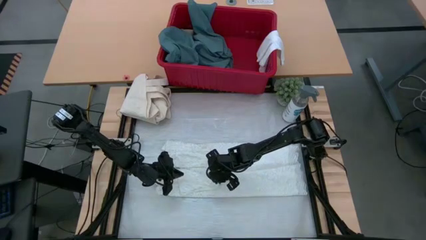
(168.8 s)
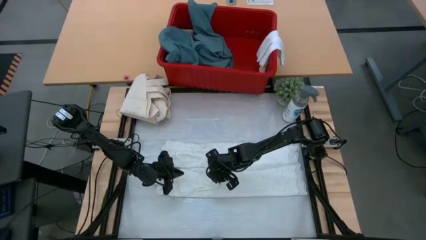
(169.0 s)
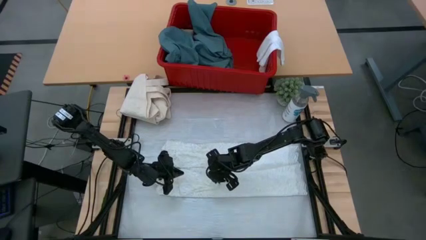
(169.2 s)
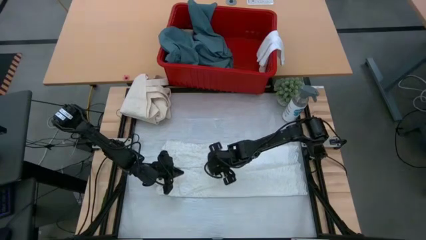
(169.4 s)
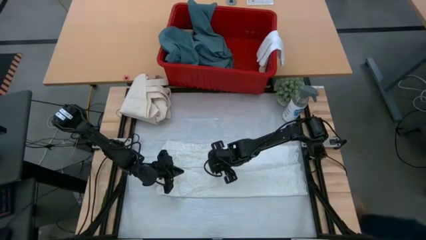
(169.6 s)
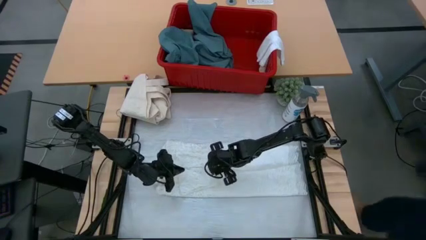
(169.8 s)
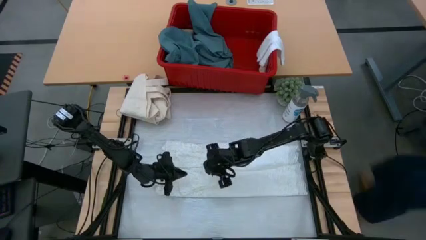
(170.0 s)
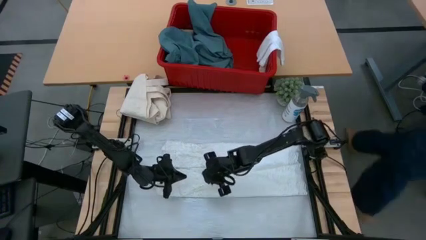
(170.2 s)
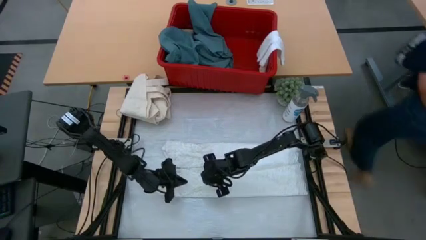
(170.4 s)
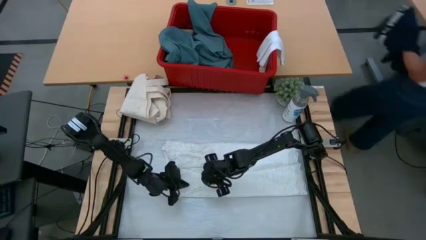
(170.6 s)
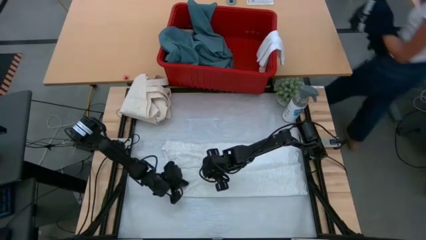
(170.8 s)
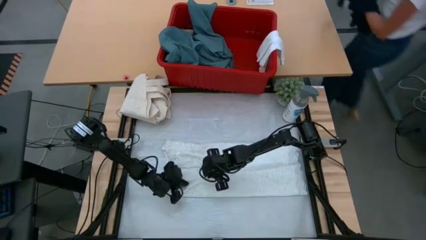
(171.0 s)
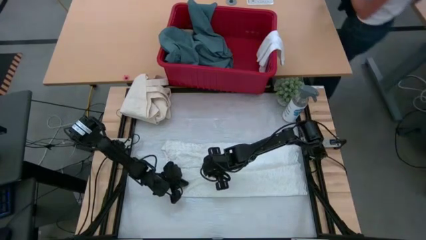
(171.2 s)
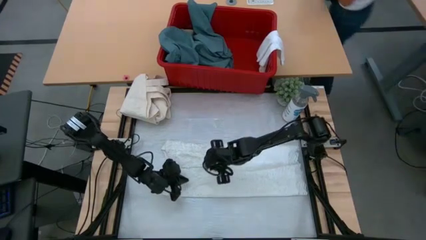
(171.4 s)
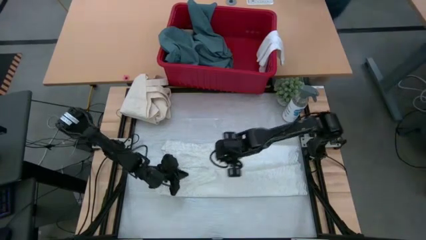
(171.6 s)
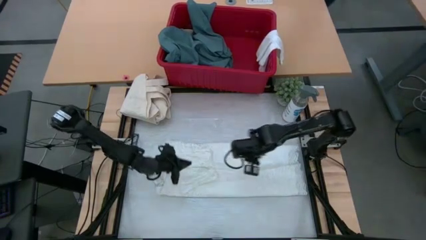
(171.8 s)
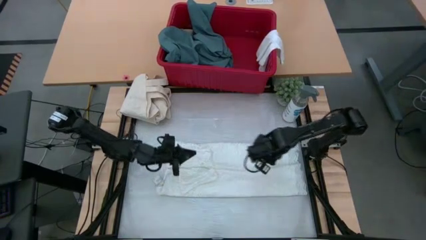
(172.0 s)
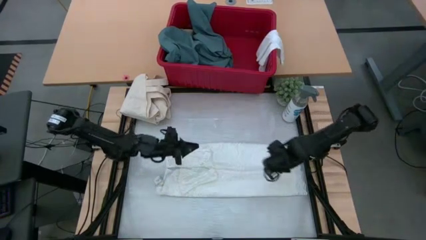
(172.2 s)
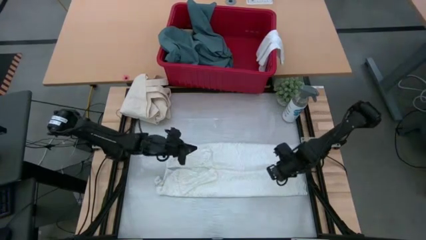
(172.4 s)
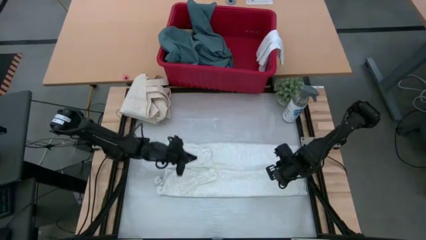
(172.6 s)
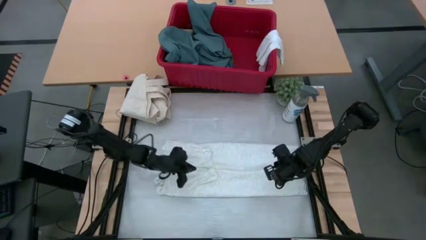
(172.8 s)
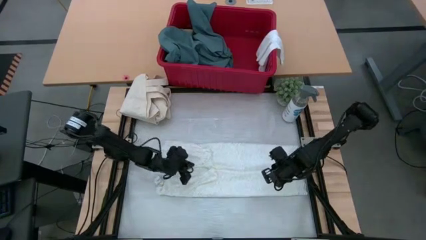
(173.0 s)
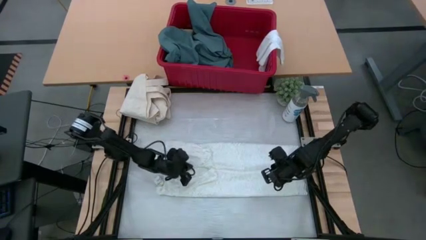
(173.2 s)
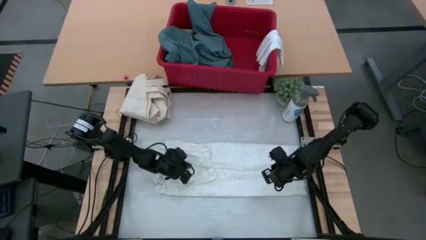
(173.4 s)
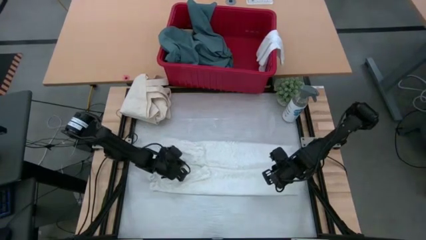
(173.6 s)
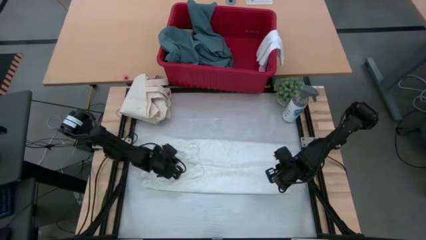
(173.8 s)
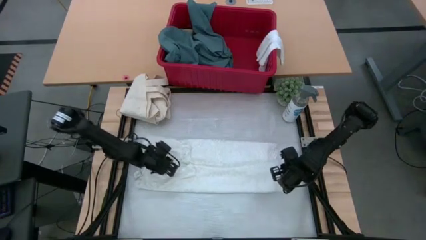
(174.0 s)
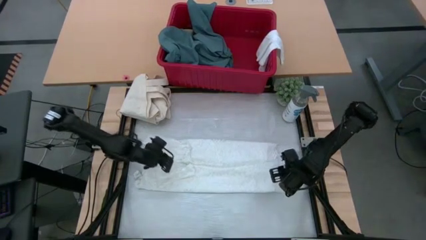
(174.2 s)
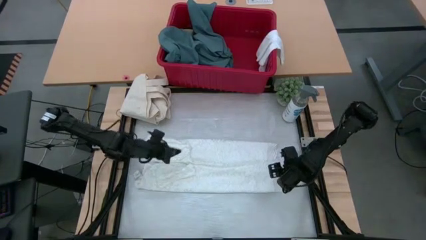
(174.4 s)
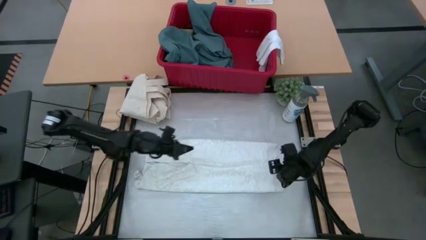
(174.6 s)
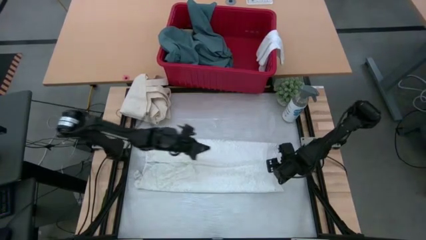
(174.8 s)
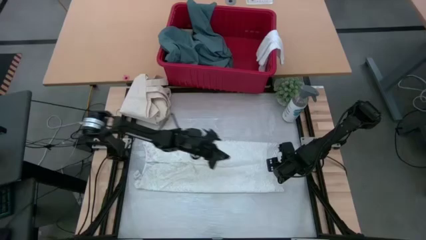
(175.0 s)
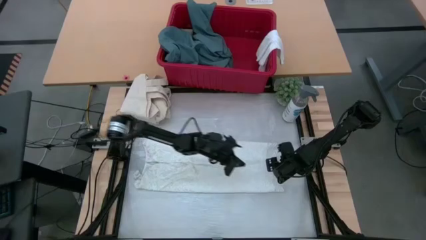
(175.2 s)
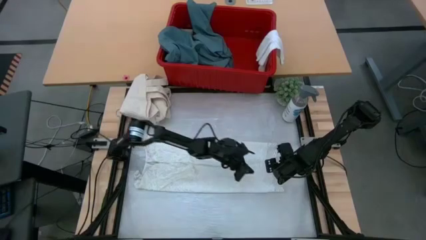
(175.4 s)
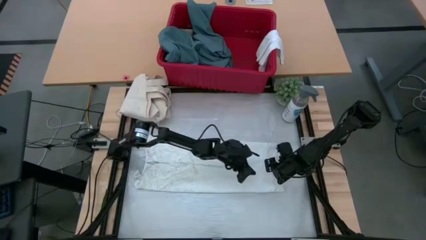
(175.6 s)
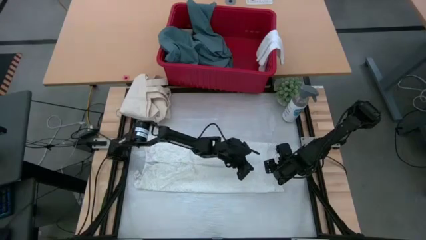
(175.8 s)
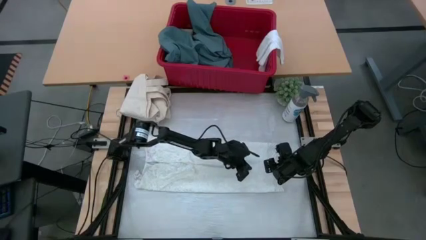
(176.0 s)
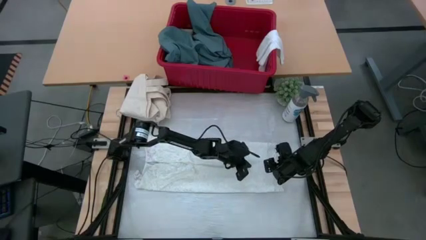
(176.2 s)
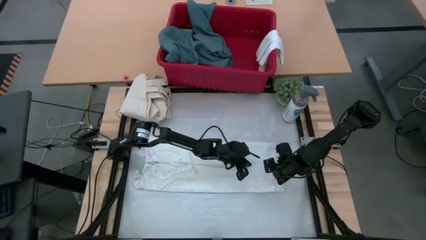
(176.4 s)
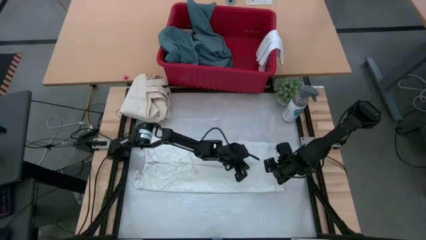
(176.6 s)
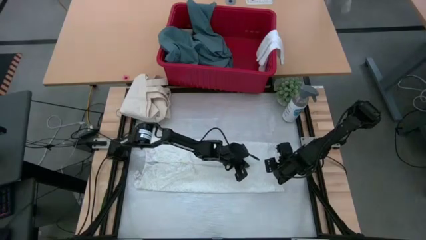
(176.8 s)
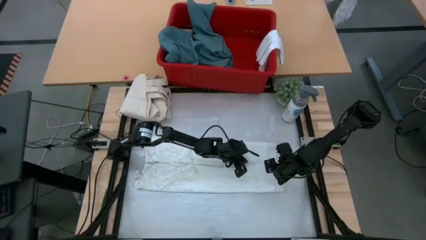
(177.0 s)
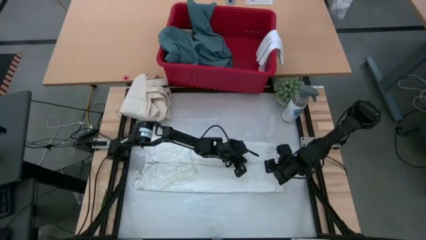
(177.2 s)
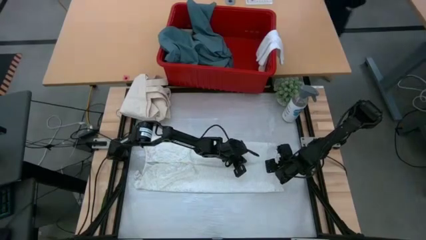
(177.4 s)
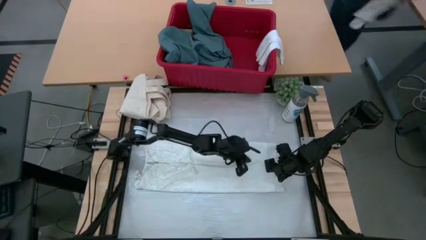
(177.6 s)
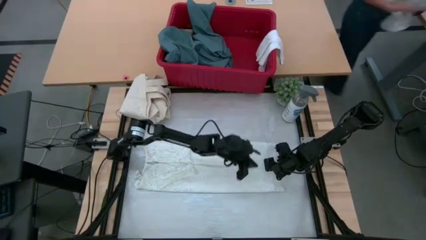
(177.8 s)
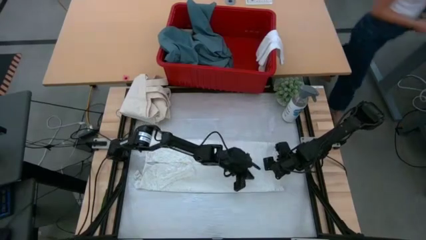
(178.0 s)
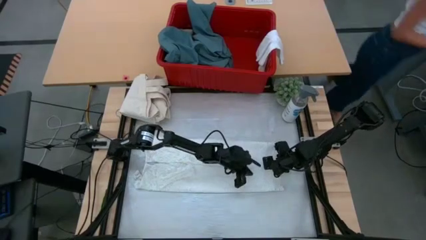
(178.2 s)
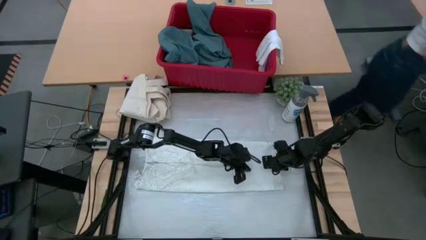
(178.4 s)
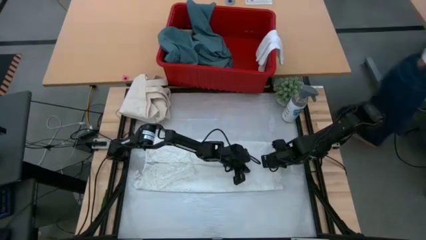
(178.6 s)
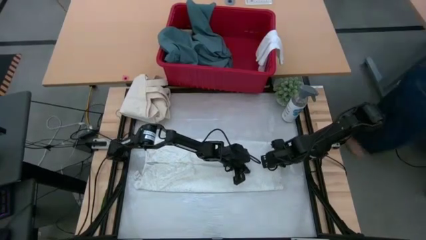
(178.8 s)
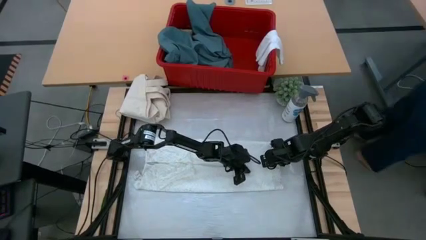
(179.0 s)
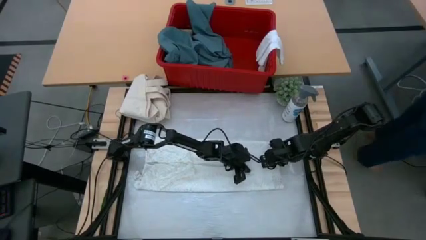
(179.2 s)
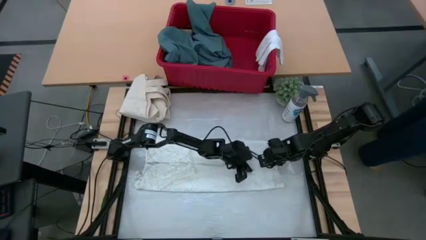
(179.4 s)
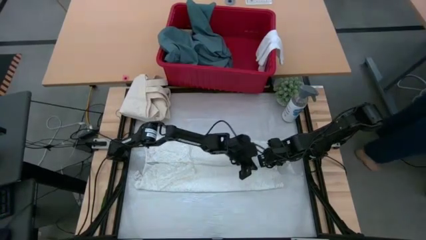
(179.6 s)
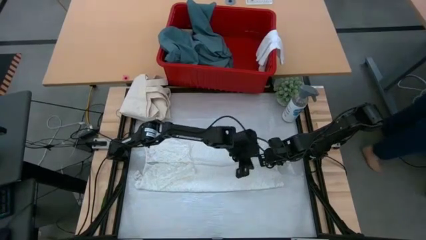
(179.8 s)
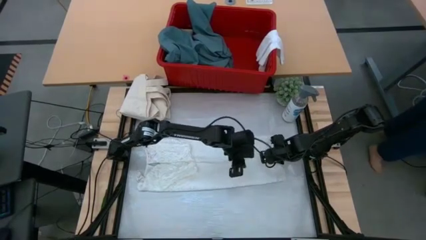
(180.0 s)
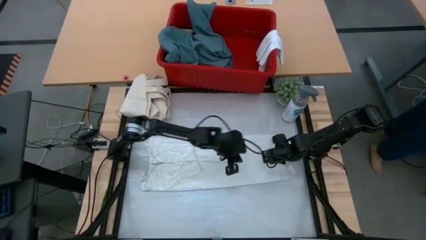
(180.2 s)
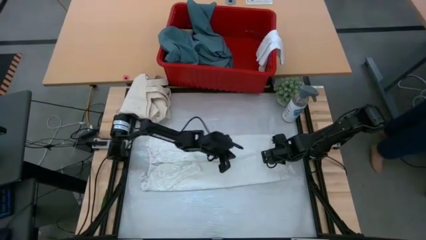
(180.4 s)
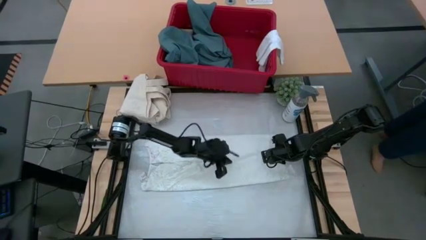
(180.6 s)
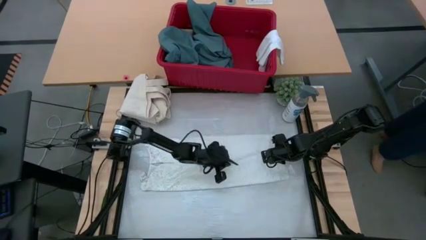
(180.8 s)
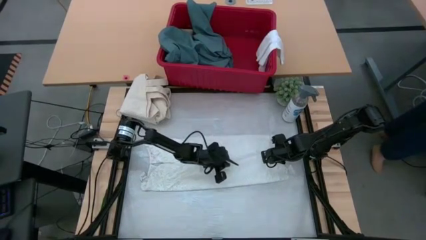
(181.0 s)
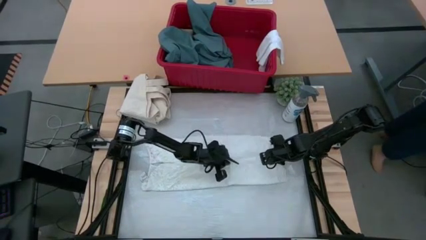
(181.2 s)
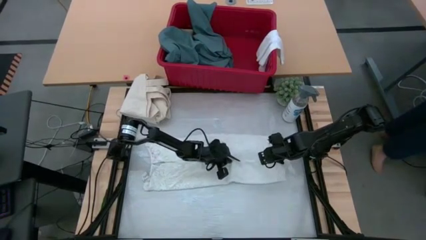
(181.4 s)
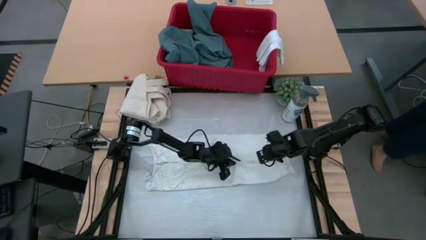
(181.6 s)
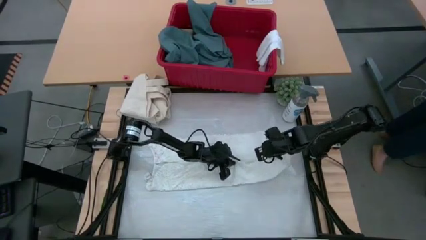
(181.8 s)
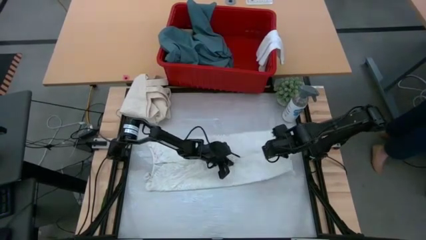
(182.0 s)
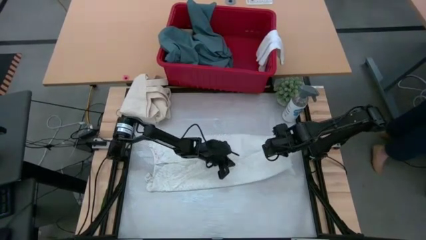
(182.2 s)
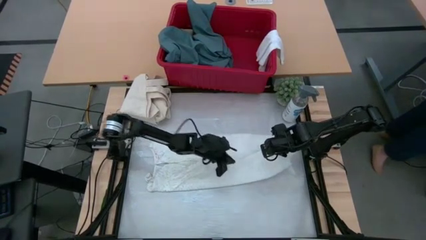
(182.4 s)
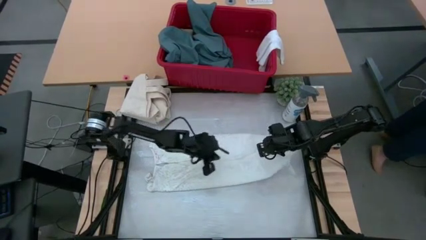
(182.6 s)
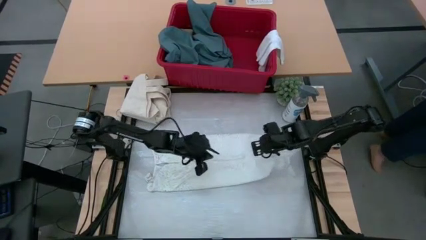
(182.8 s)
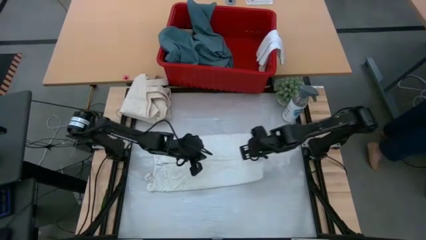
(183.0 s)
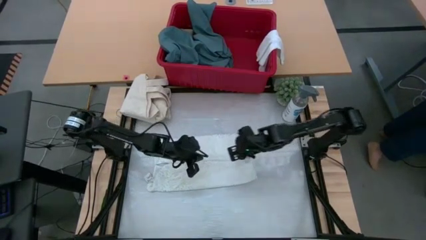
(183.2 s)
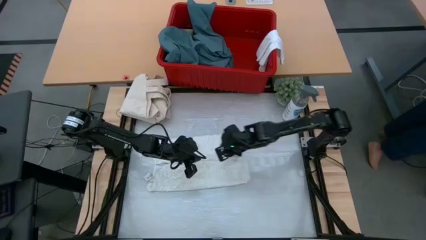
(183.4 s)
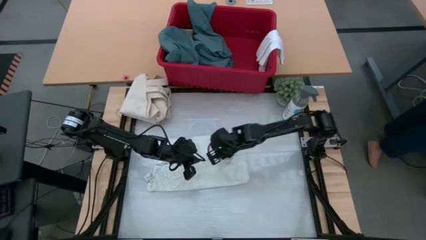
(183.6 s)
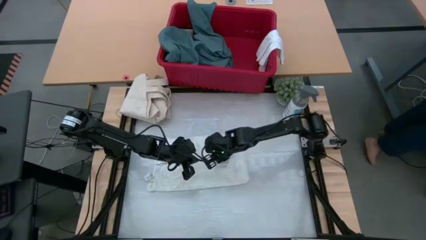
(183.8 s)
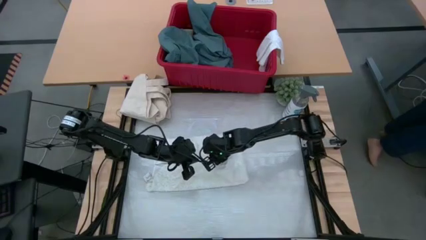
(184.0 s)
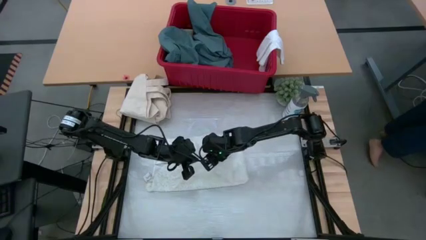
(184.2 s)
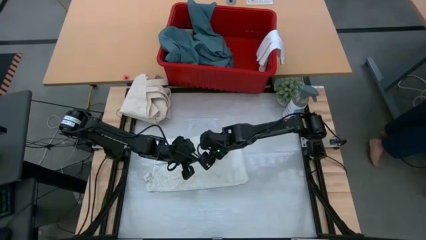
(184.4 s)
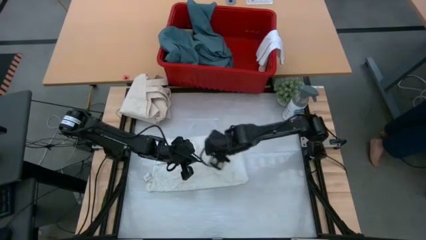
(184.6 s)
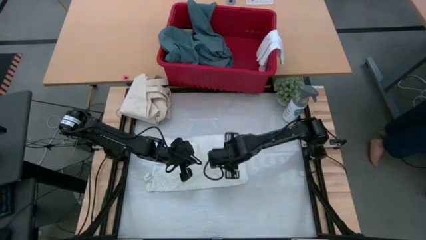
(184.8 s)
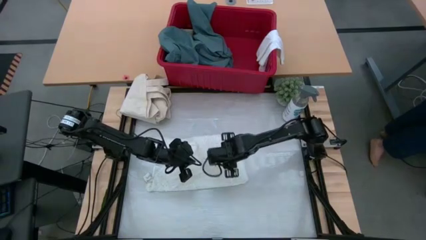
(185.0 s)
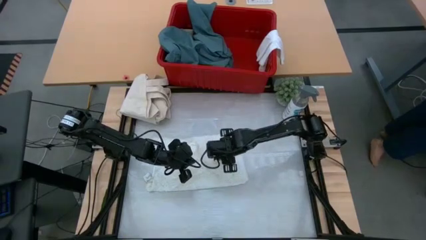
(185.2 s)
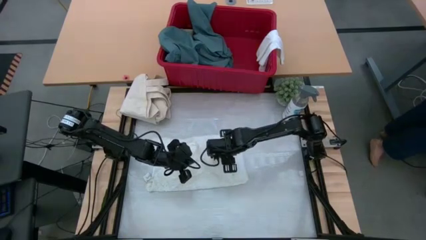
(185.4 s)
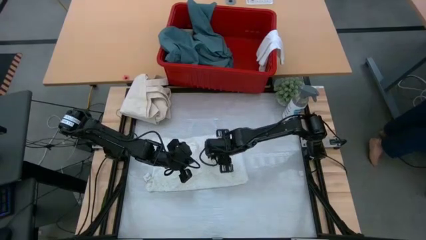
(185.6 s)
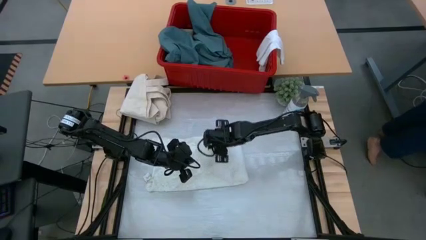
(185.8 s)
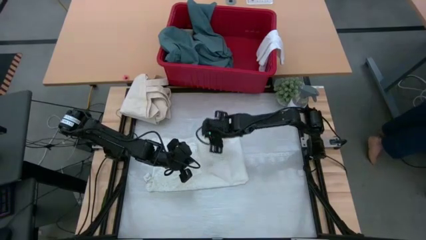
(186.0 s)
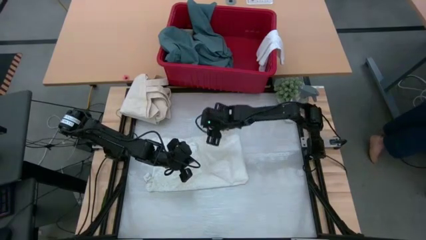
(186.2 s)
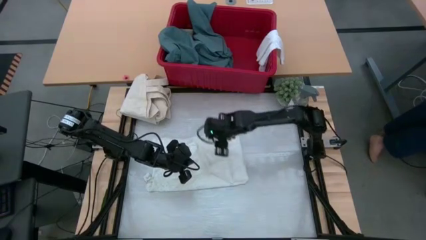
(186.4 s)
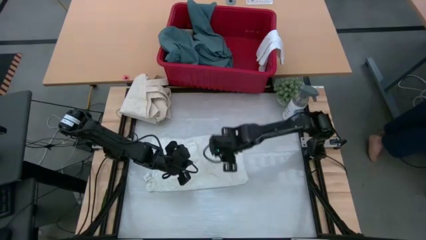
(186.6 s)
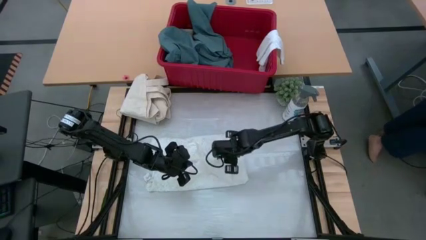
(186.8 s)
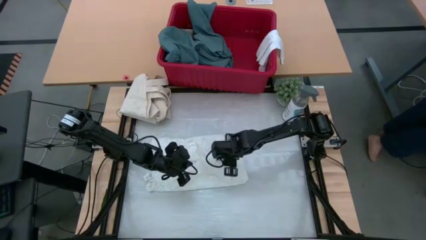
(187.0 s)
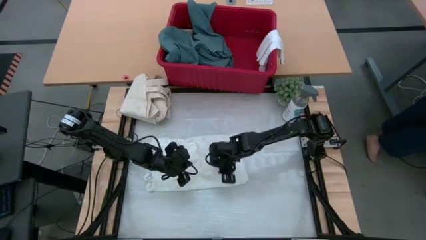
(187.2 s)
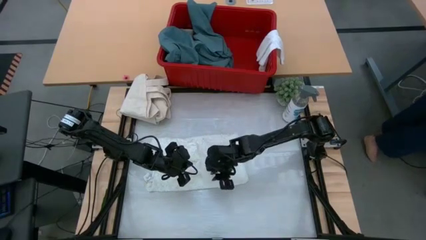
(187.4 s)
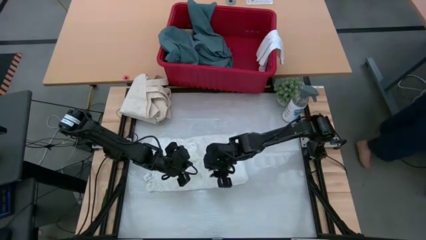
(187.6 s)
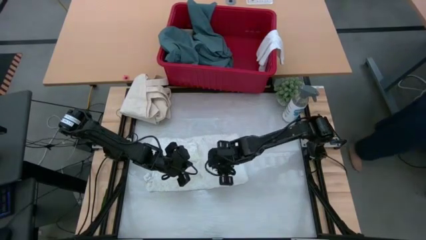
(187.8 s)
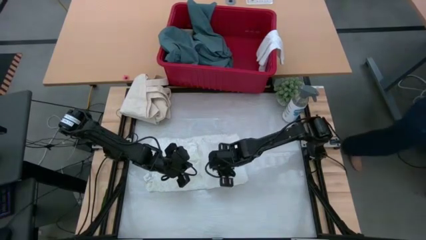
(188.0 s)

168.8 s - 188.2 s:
Task: Fold Laundry from Bin
Fold the white shirt
